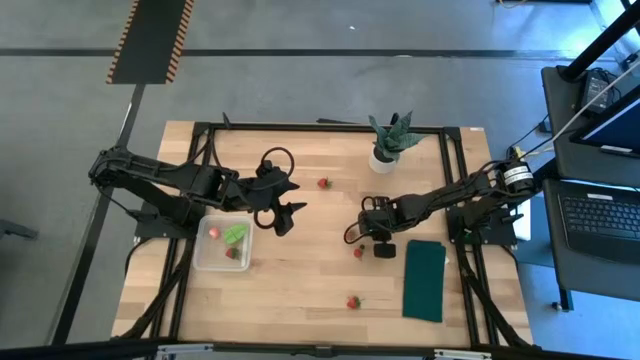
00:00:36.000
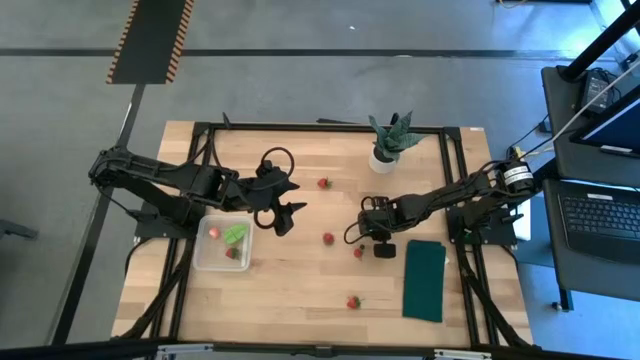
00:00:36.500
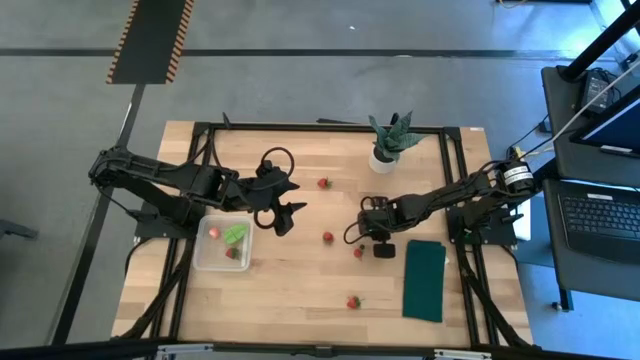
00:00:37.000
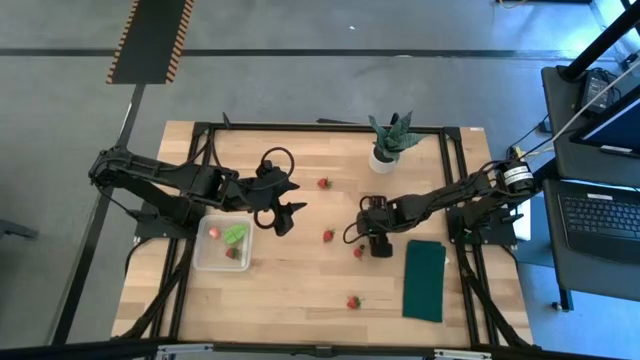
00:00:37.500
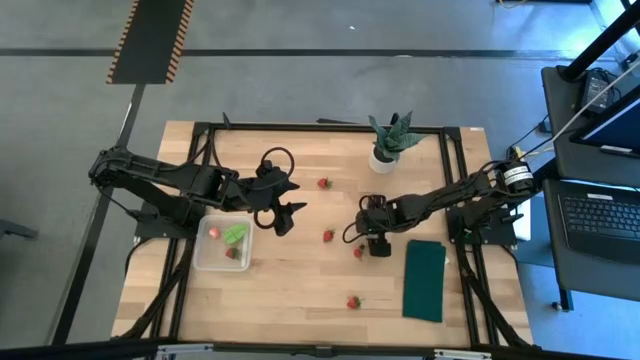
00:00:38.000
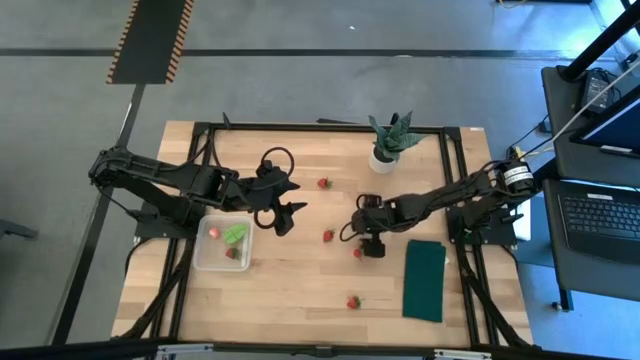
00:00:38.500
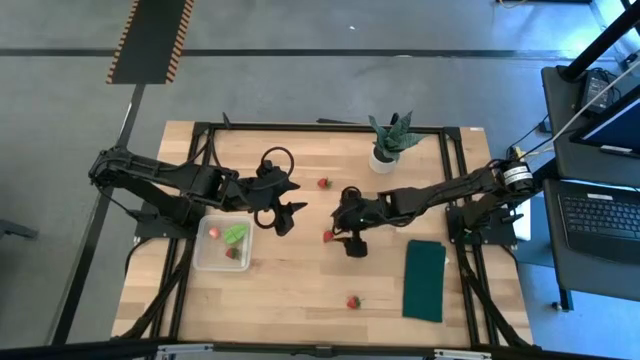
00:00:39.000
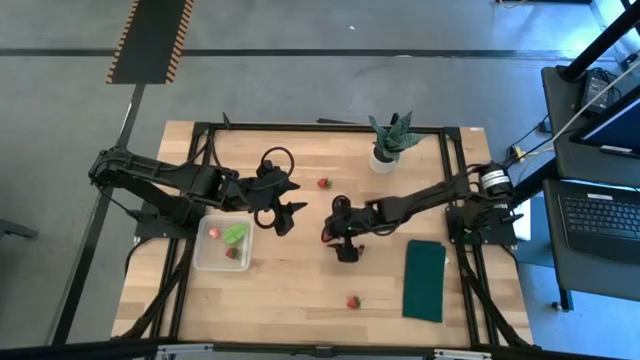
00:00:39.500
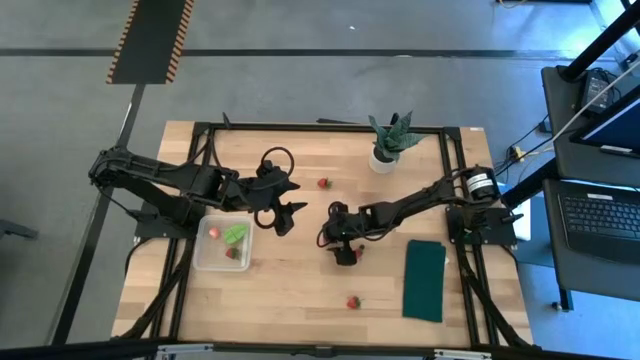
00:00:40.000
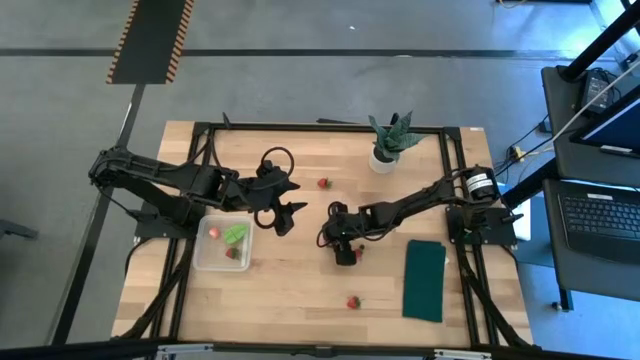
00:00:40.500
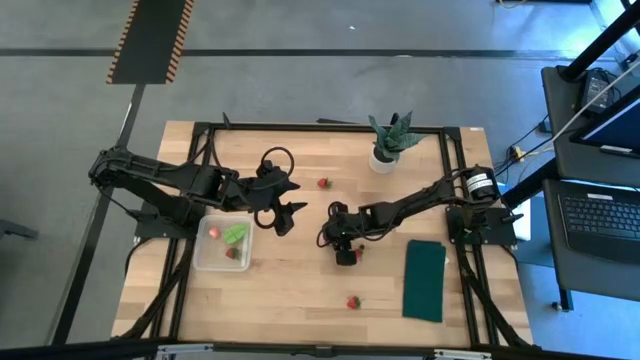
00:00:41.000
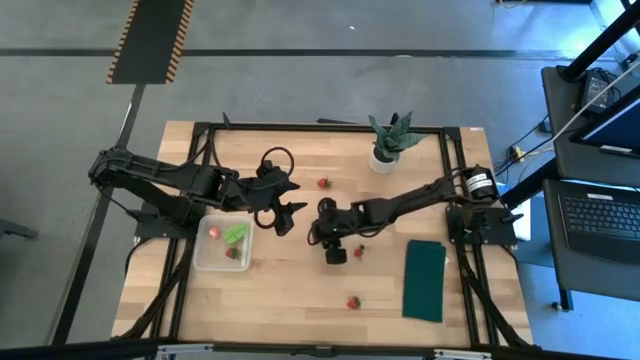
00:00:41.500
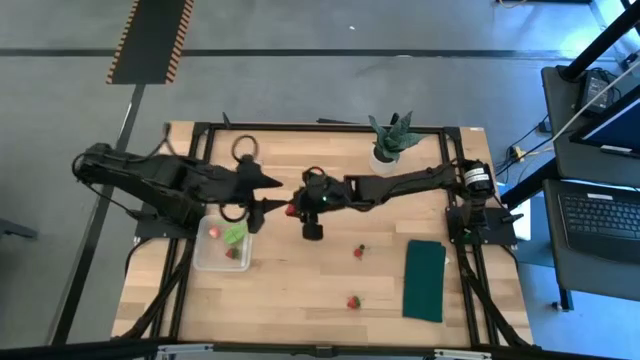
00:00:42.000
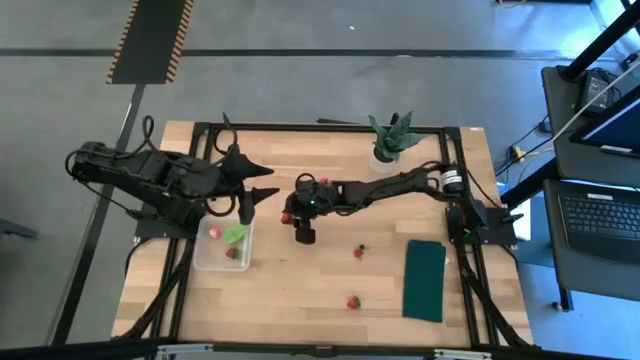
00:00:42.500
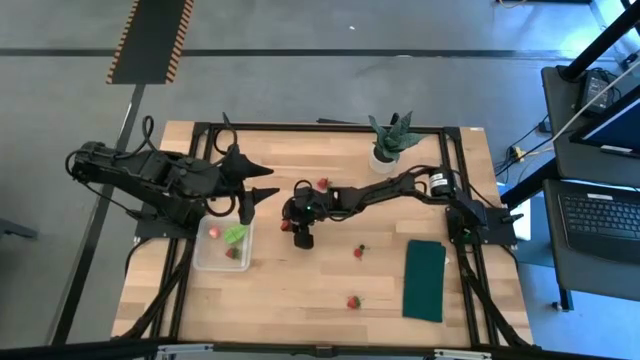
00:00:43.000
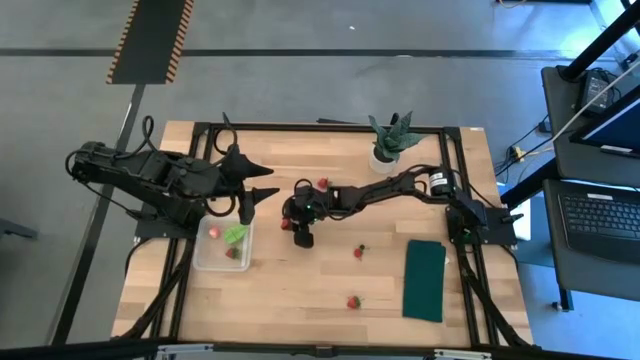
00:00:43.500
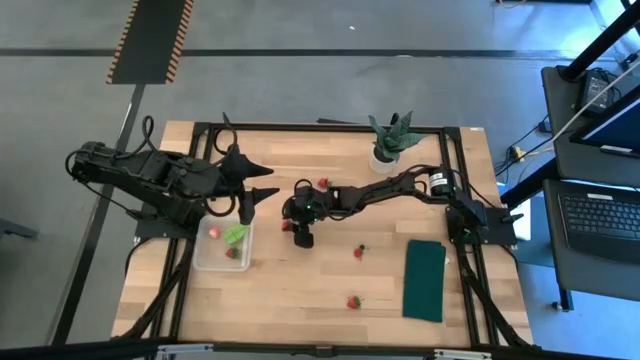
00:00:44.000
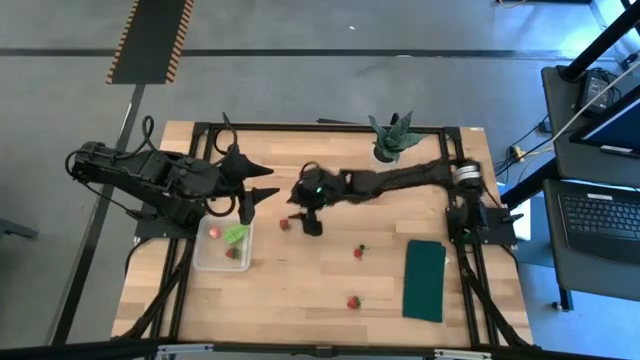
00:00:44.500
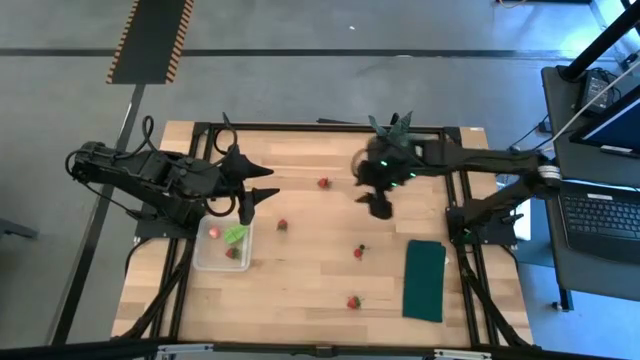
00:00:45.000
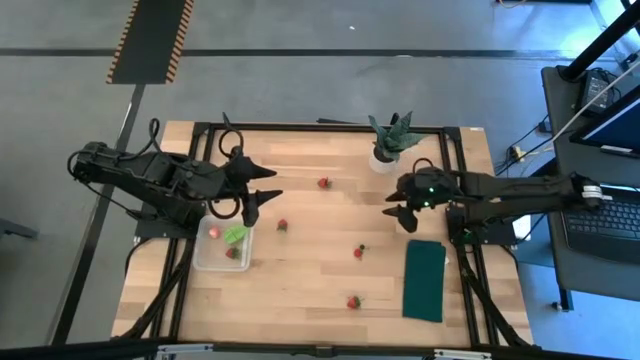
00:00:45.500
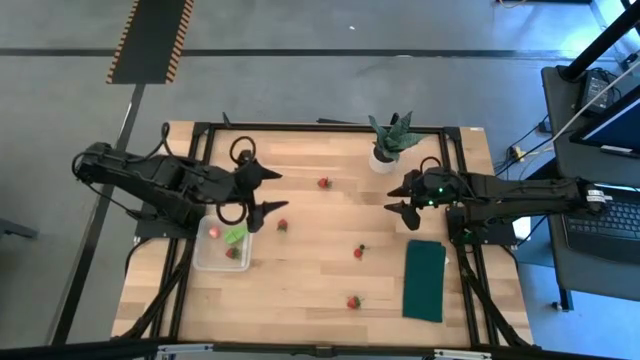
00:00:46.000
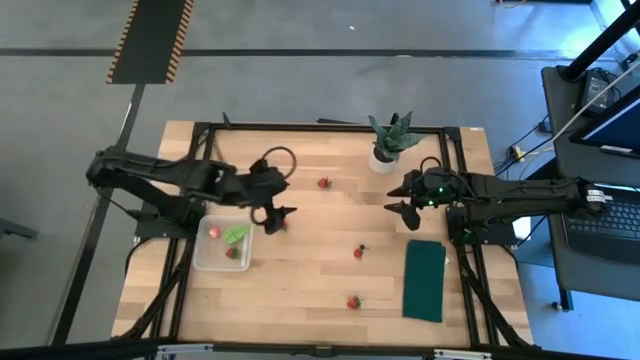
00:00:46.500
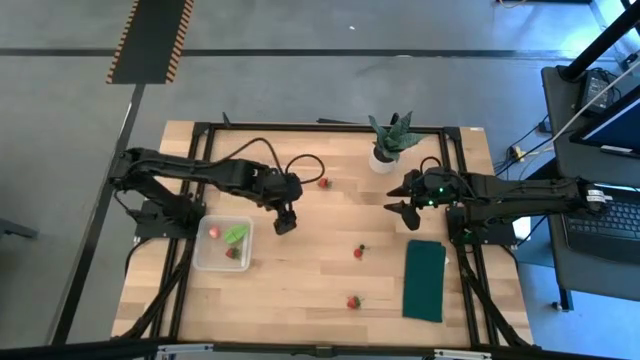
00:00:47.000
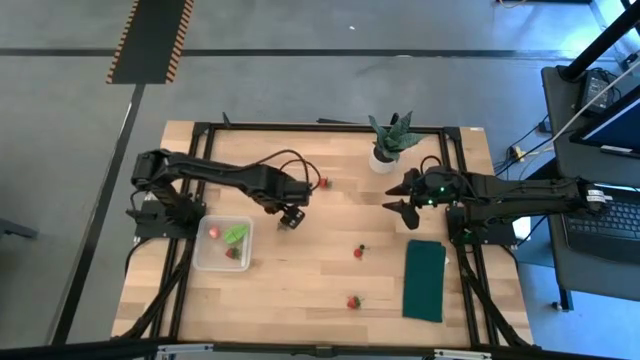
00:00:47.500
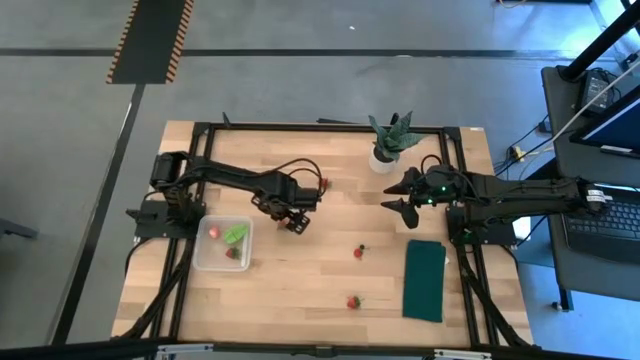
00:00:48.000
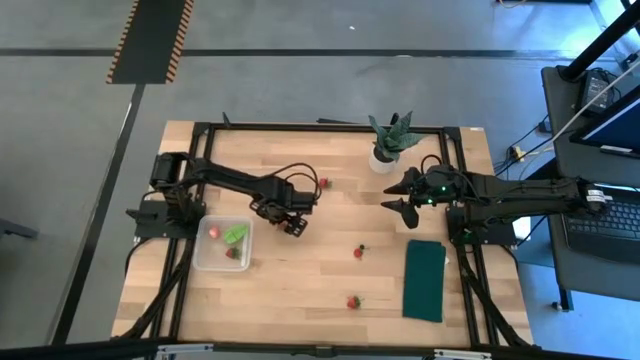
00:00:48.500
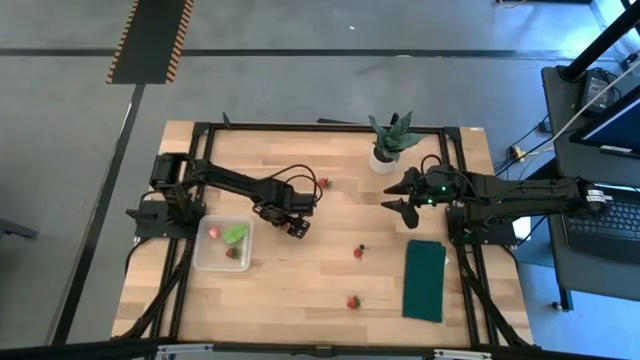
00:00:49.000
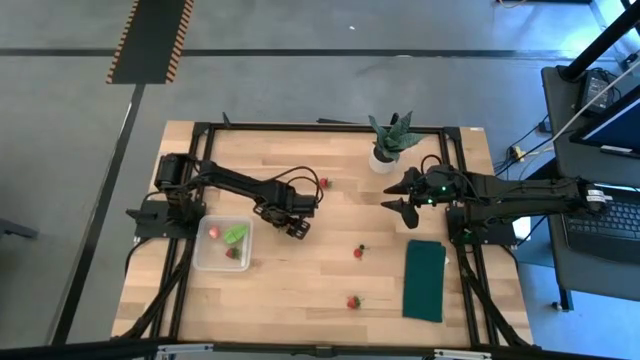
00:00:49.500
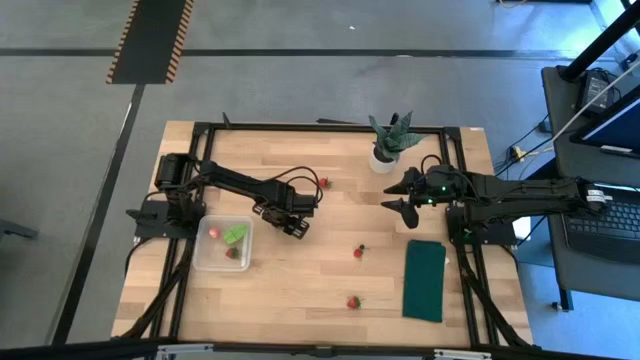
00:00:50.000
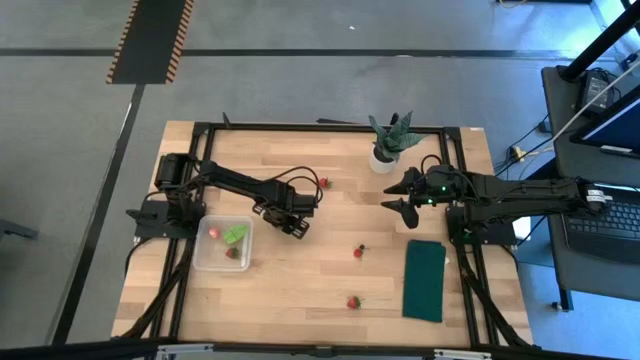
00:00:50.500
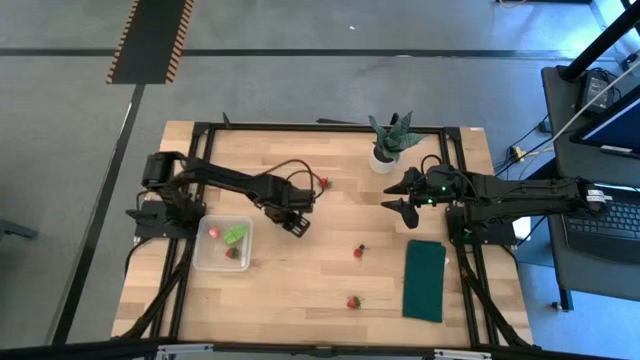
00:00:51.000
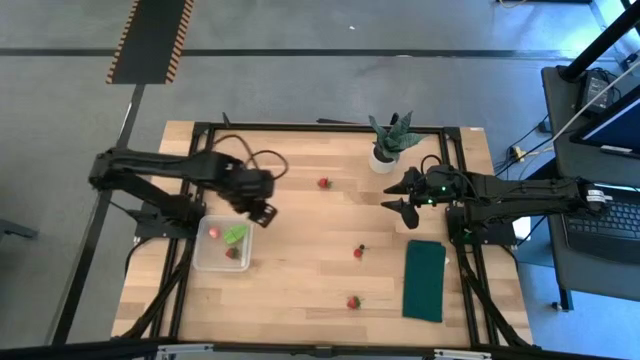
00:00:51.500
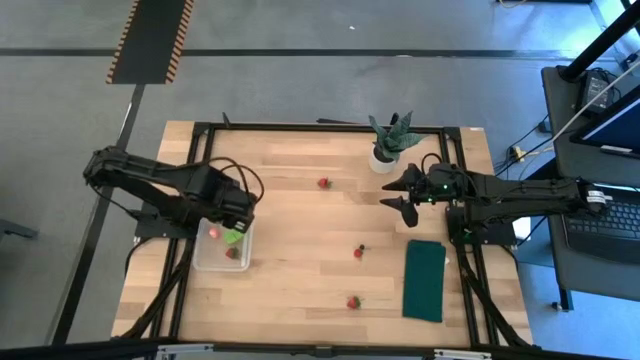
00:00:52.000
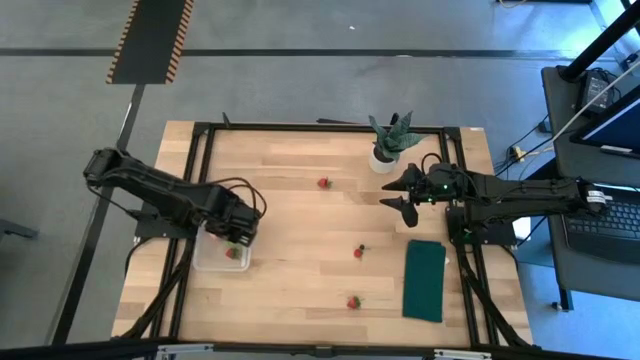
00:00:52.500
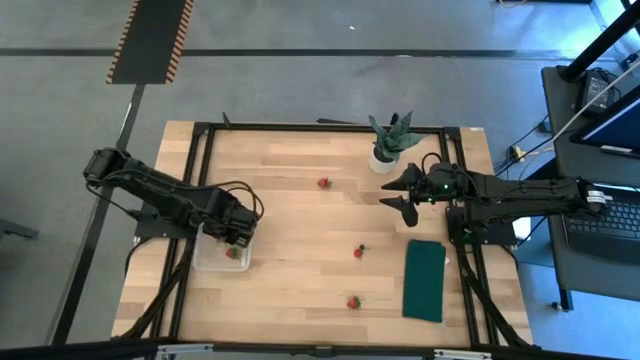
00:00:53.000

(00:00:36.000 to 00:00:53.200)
Task: Pick and placing Produce into tupperware
Put the red strawberry into the transparent bin
